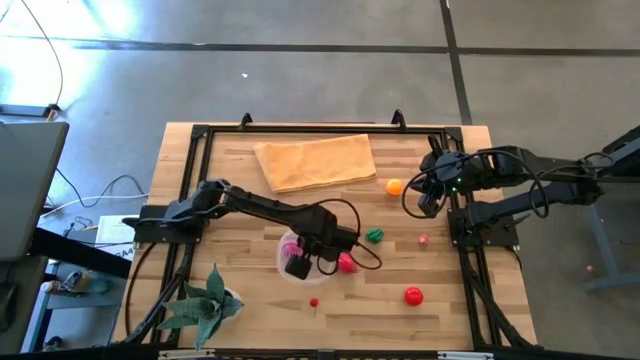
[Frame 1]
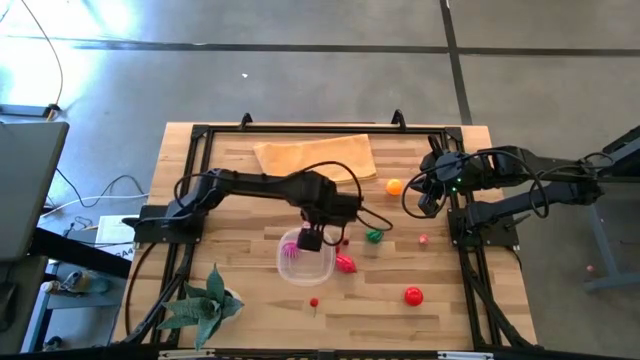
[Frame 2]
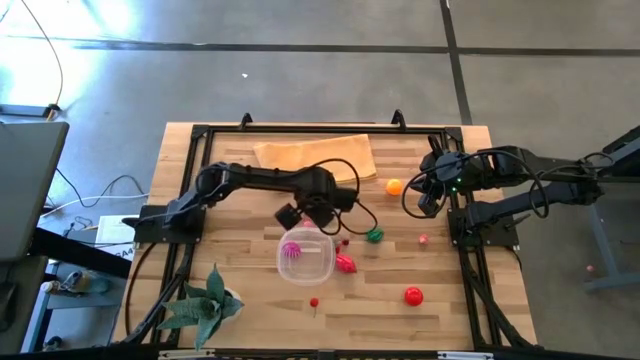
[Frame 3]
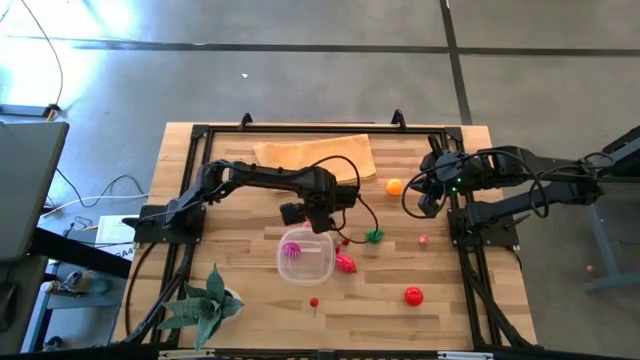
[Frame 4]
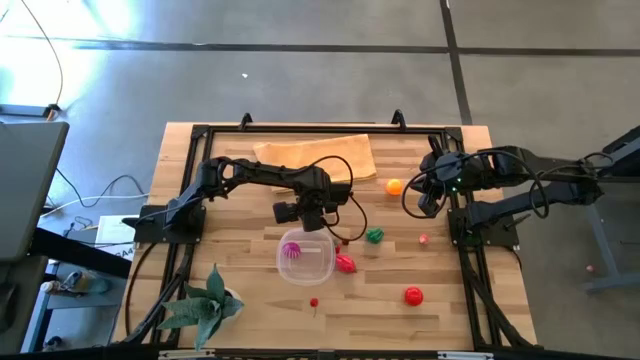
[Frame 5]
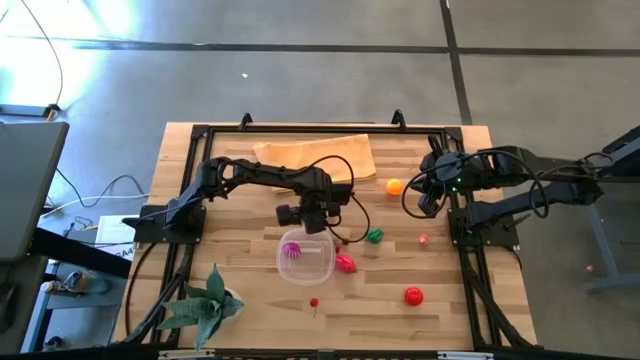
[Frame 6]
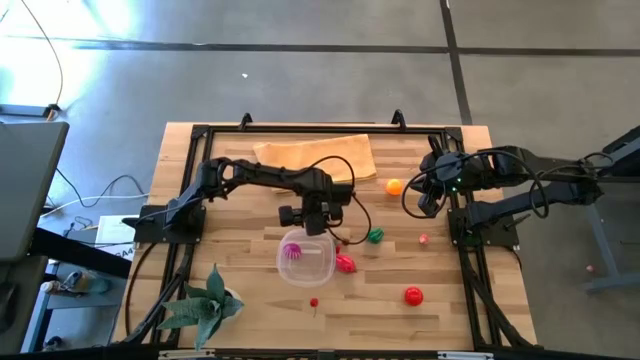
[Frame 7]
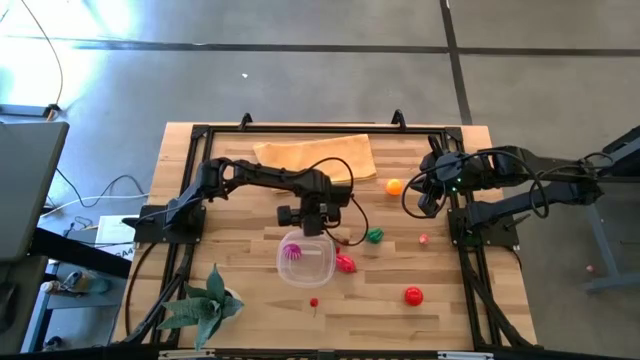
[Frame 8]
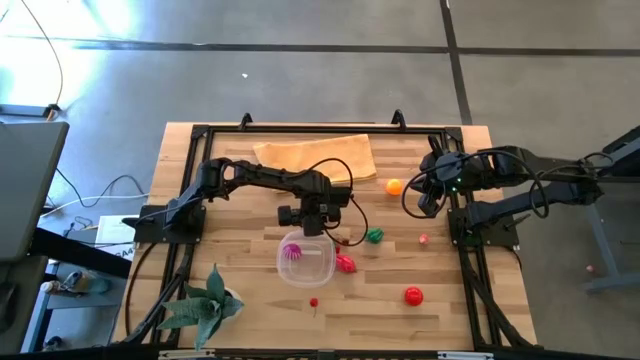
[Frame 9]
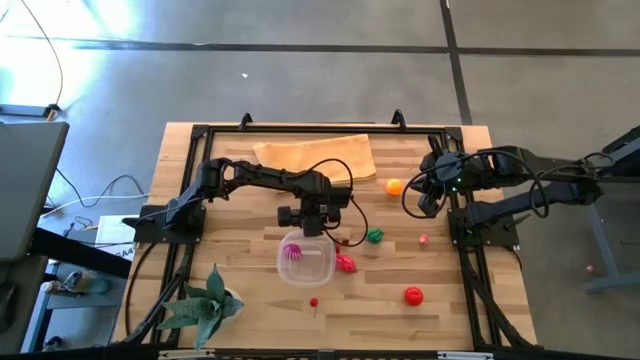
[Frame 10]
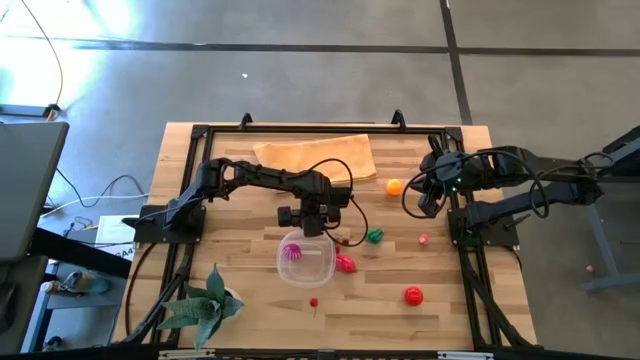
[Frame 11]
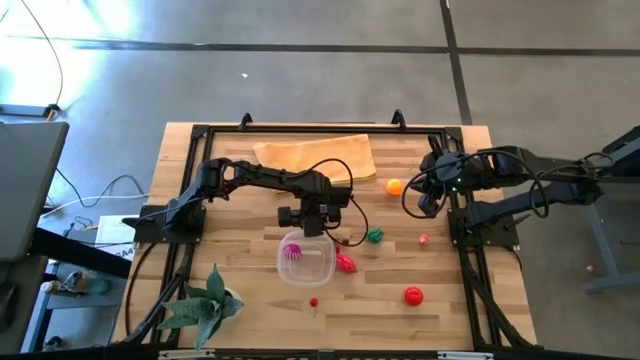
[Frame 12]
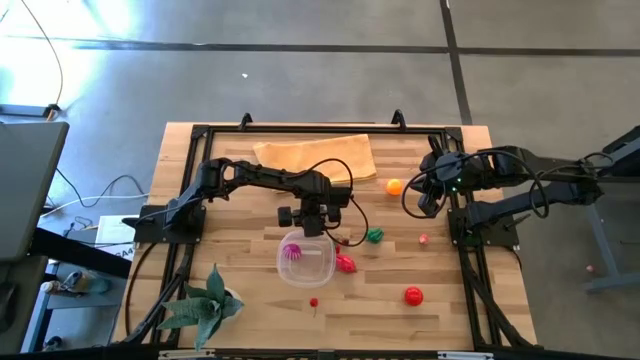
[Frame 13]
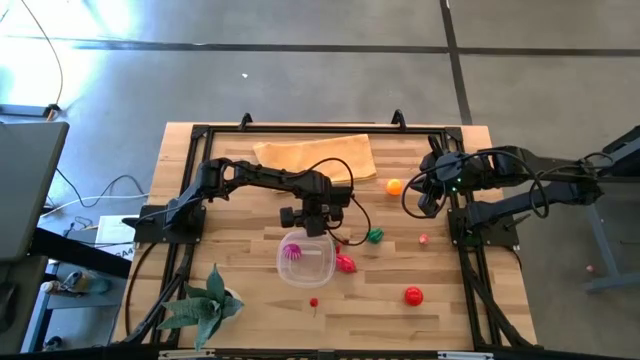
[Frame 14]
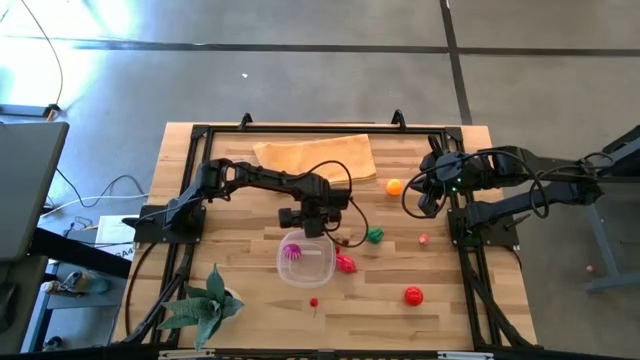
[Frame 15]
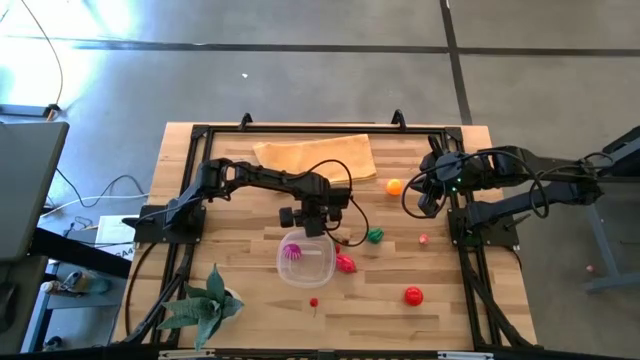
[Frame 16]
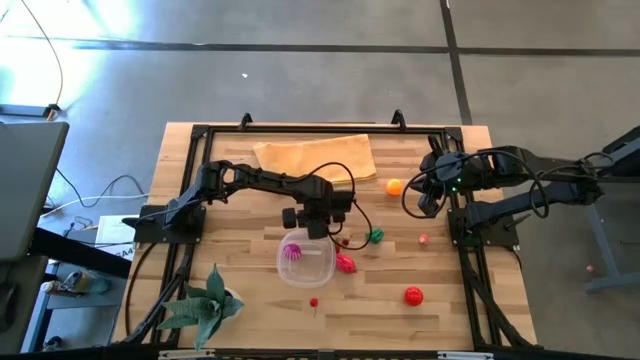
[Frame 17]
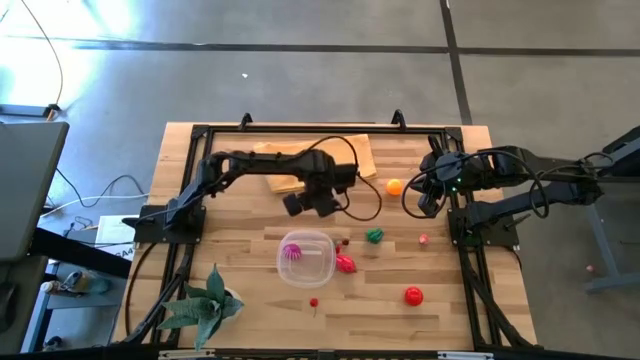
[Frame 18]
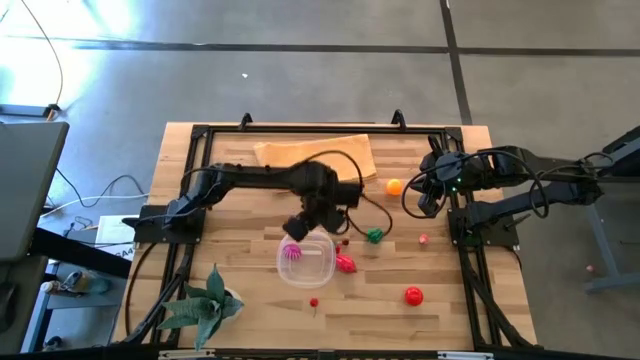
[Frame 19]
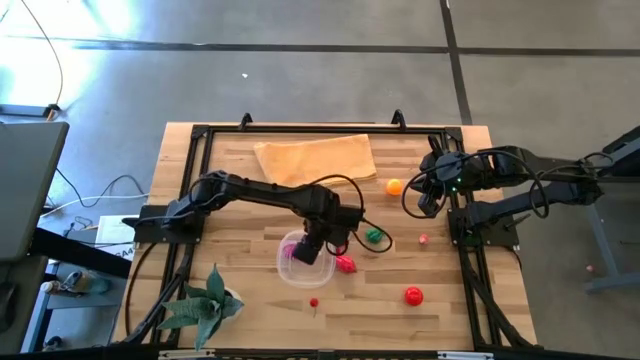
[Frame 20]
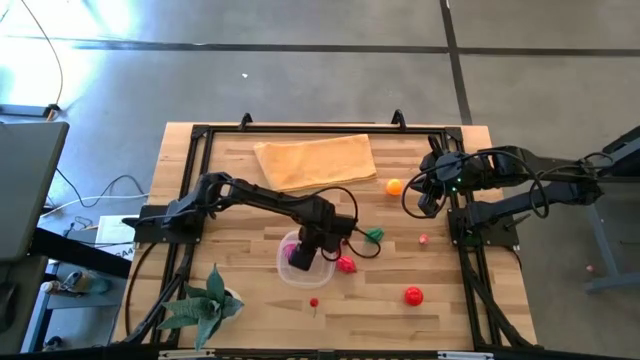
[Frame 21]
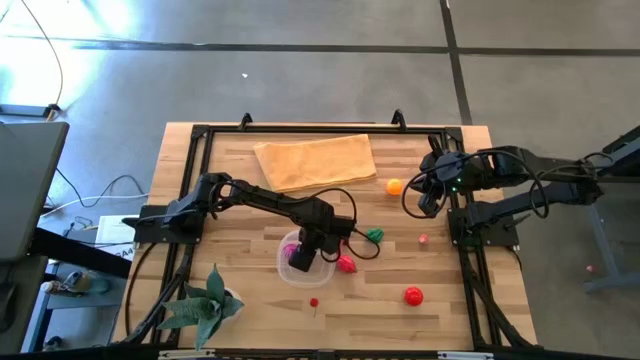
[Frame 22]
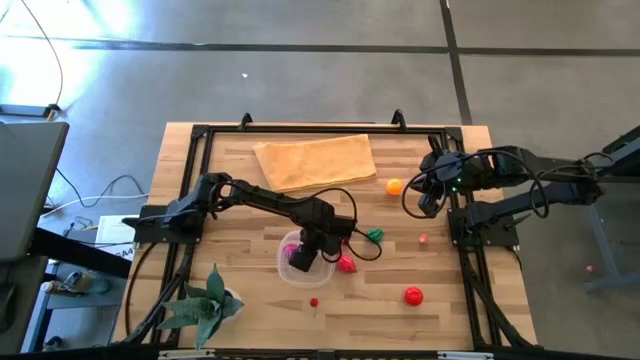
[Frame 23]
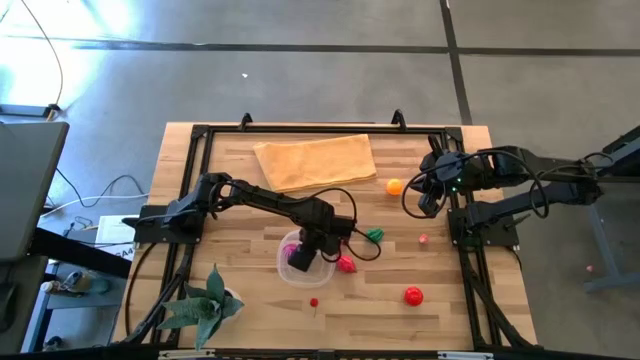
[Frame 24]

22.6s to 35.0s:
Task: Pick and placing Produce into tupperware
Put the left pink peach into the transparent bin

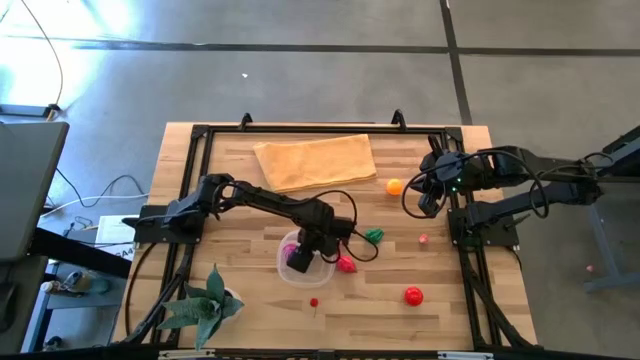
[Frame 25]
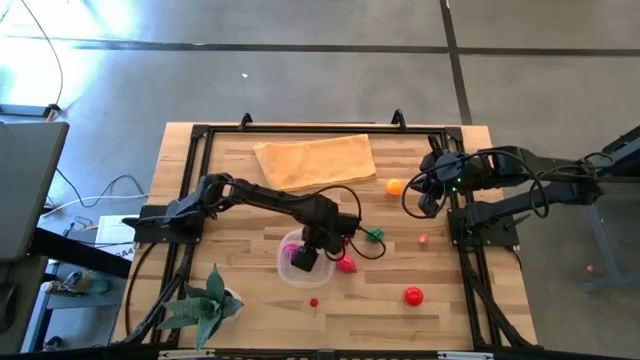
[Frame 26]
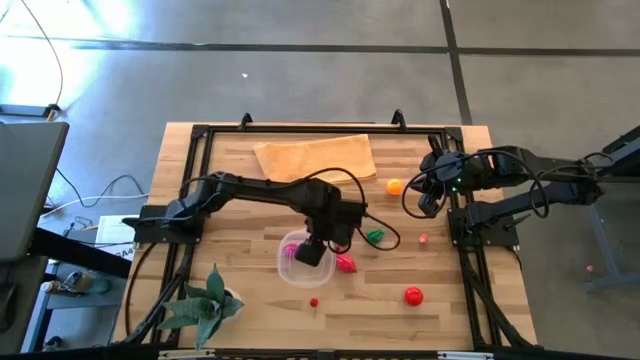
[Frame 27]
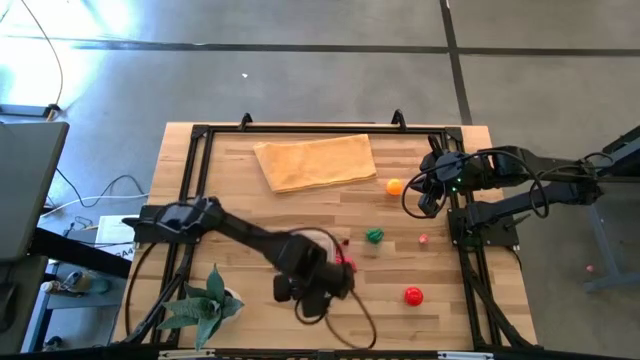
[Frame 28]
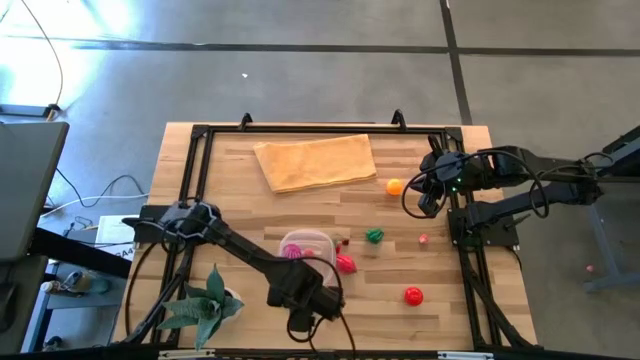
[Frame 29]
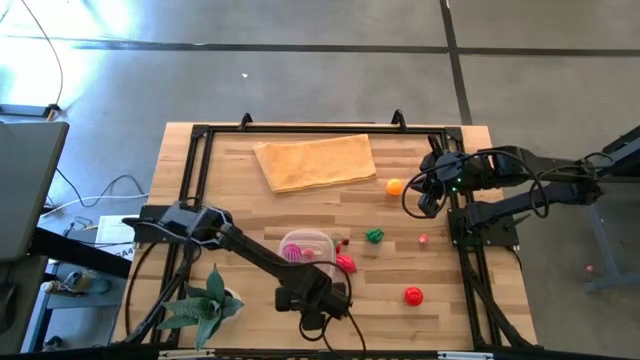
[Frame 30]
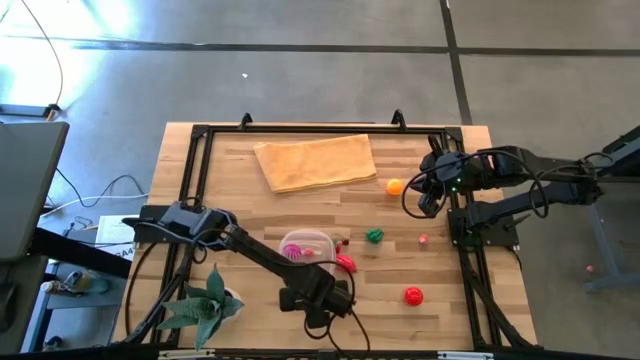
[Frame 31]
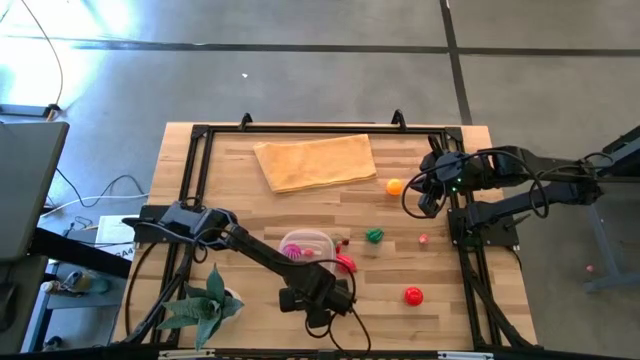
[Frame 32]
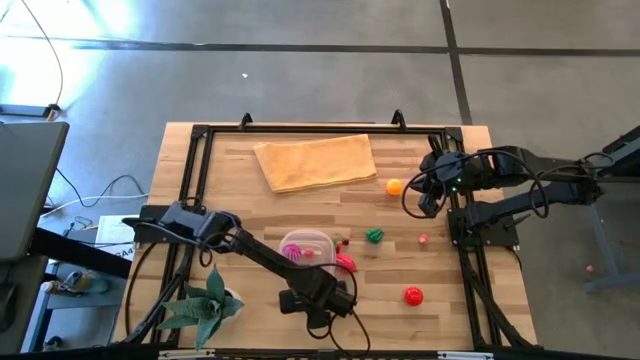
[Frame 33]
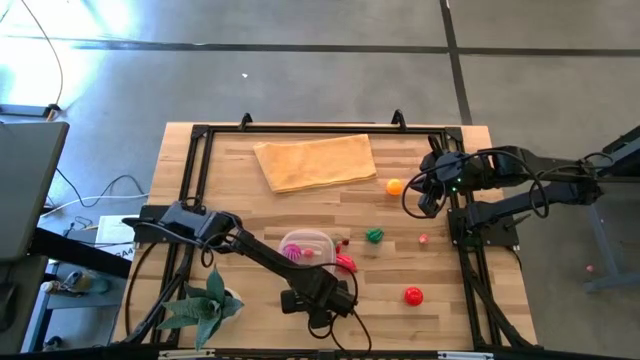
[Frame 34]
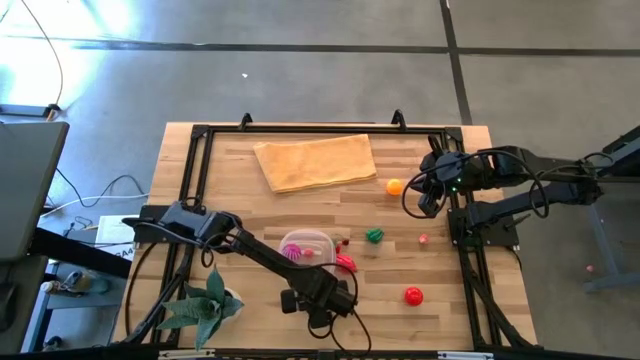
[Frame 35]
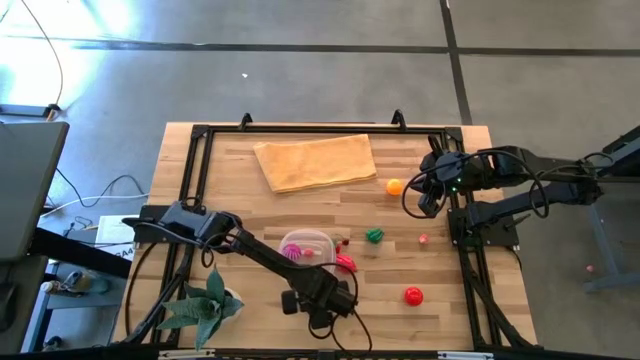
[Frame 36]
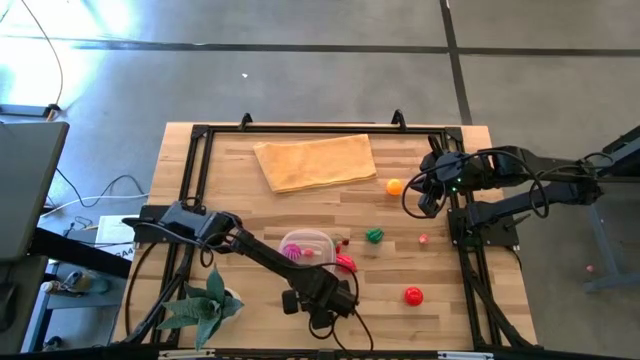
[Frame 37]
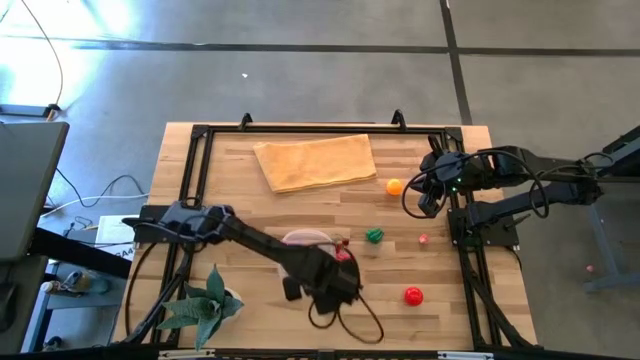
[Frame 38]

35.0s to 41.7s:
Put the bottom red cherry into the transparent bin

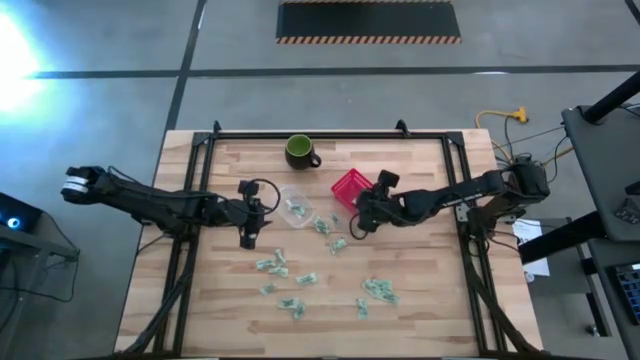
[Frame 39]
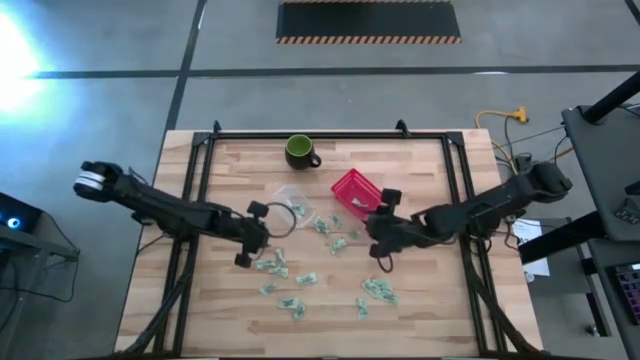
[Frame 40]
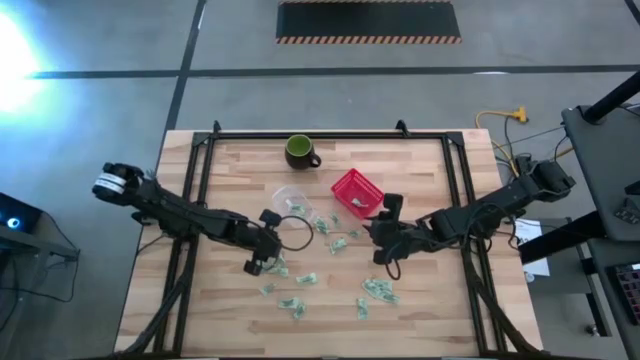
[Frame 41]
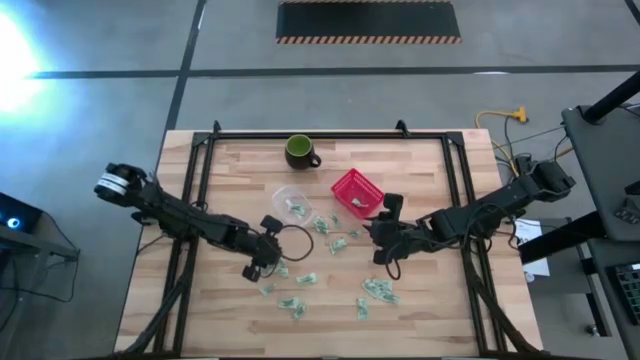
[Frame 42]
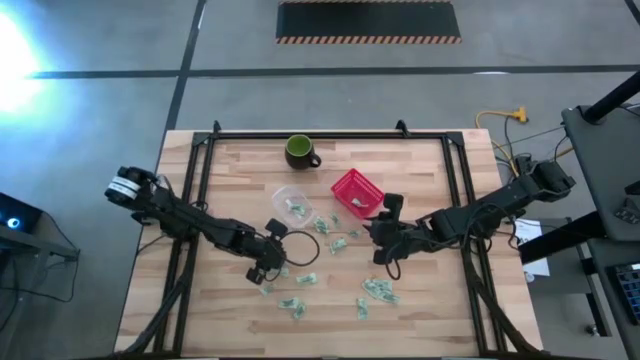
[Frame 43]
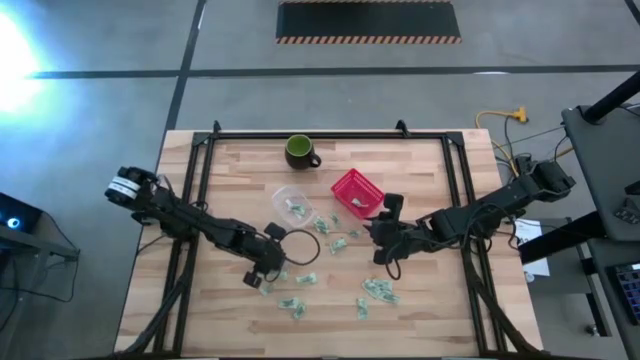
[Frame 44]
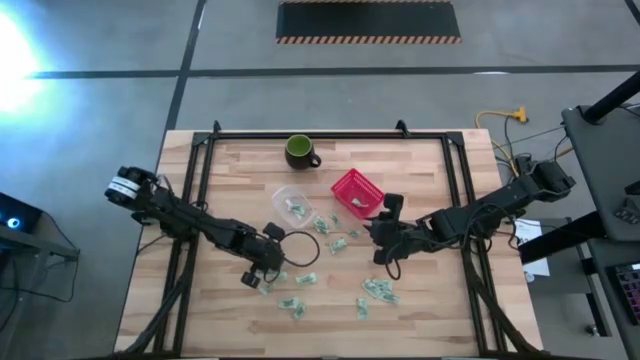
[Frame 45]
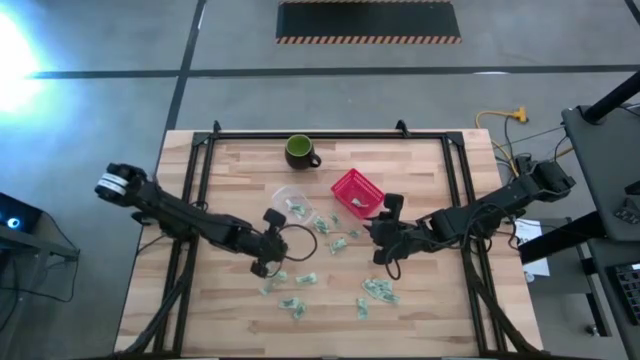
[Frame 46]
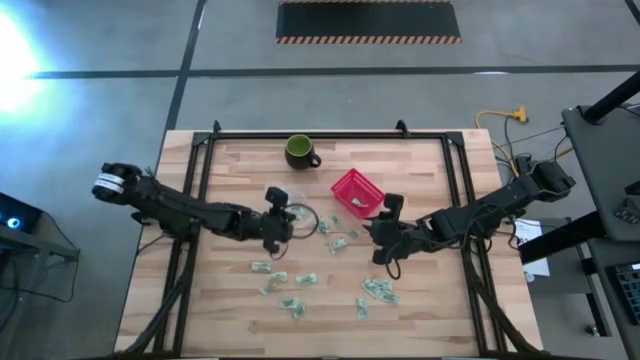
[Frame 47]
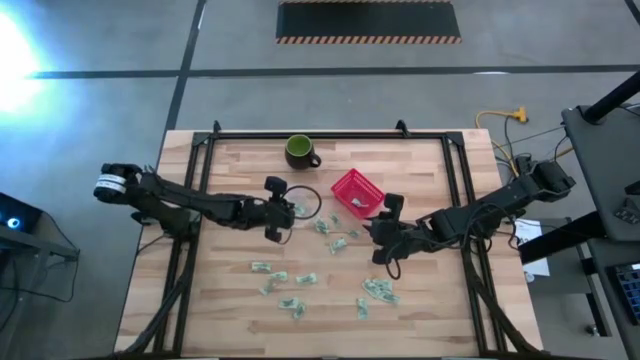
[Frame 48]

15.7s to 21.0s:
Task: Pick and place items into bin
Put the stevia packet into the transparent bin
